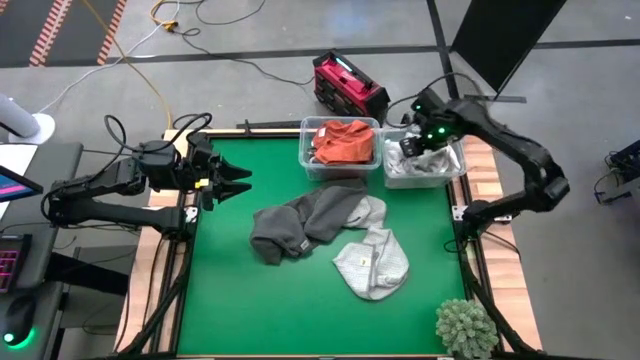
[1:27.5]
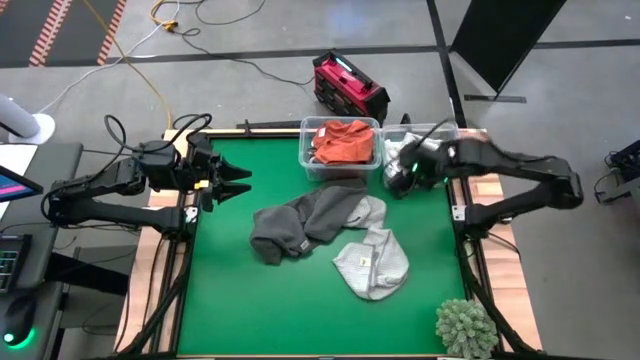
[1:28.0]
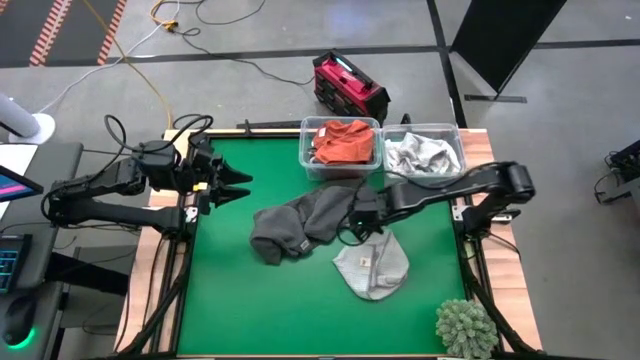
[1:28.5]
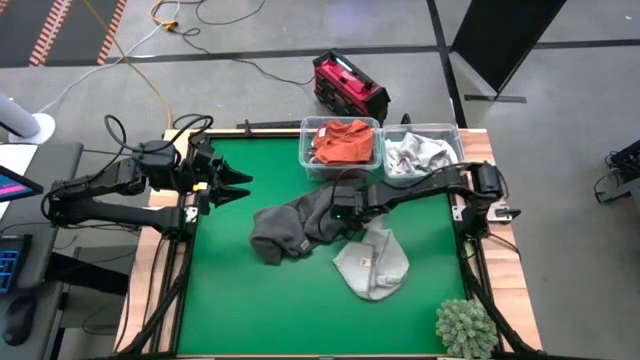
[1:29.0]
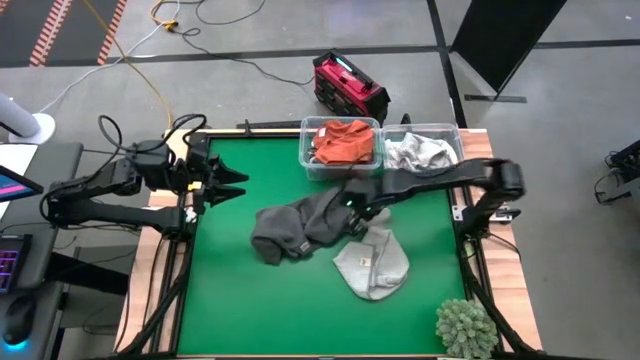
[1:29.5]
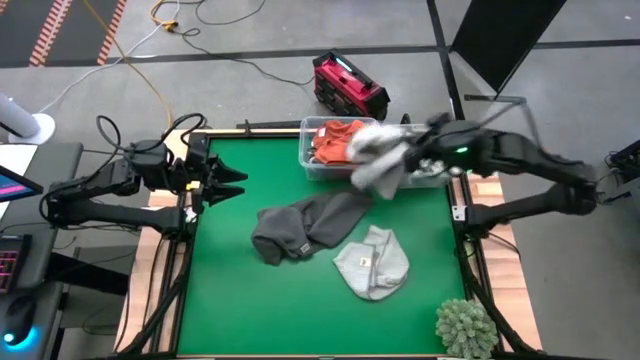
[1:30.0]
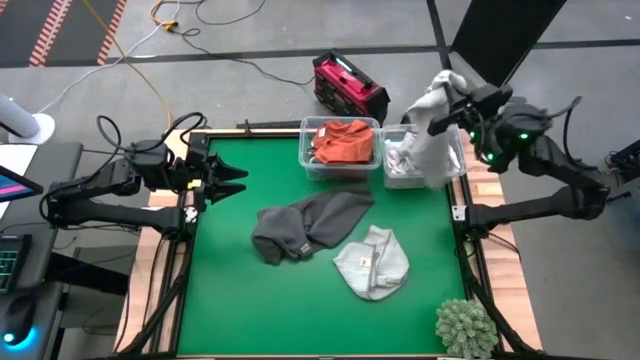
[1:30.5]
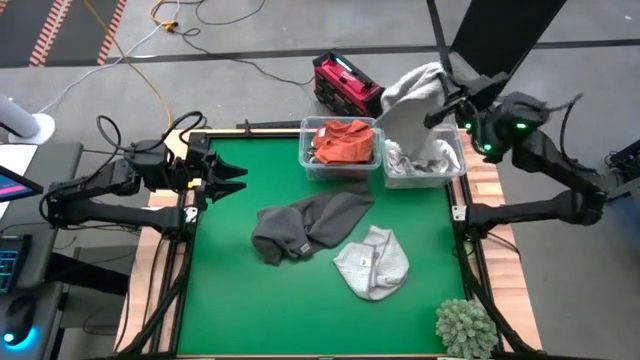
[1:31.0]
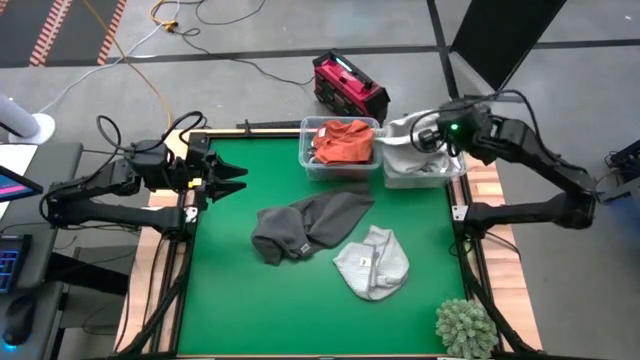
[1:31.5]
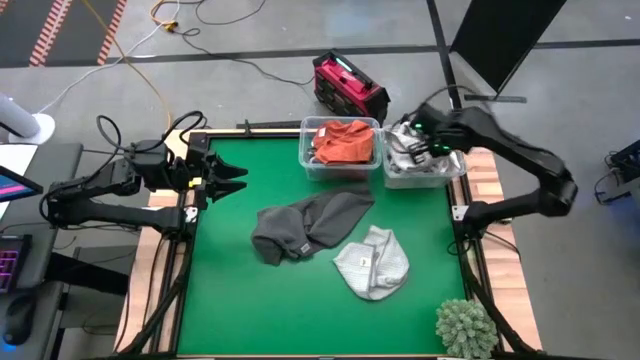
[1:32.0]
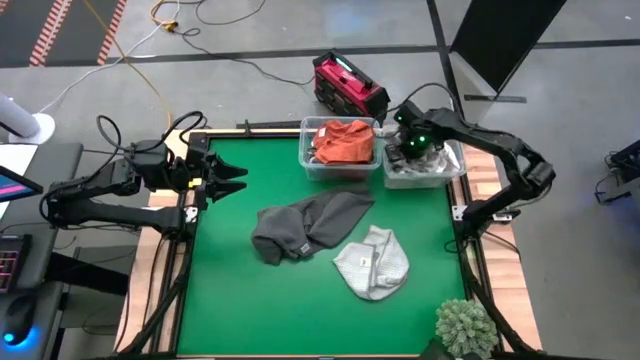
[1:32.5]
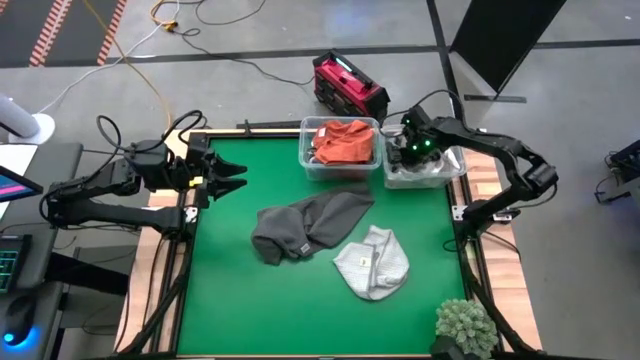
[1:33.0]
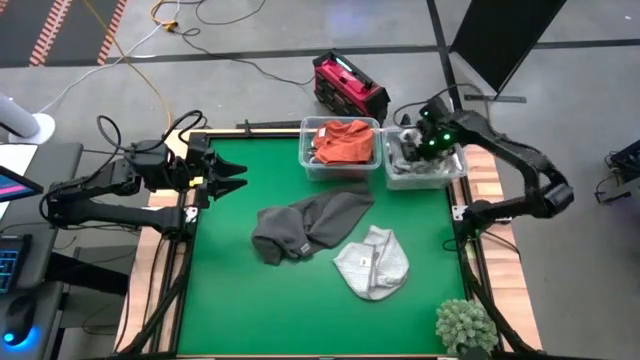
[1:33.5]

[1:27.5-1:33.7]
Task: Sort towels by color in basket
Put the light gray towel into the right transparent bin

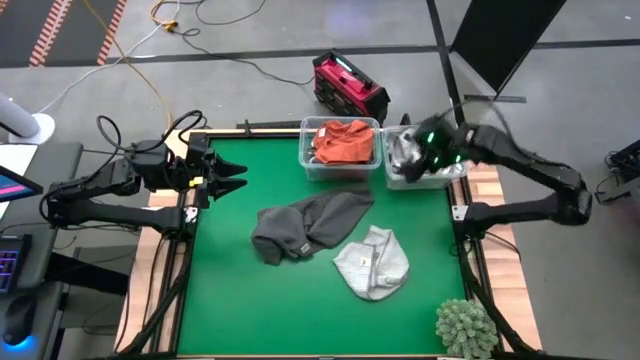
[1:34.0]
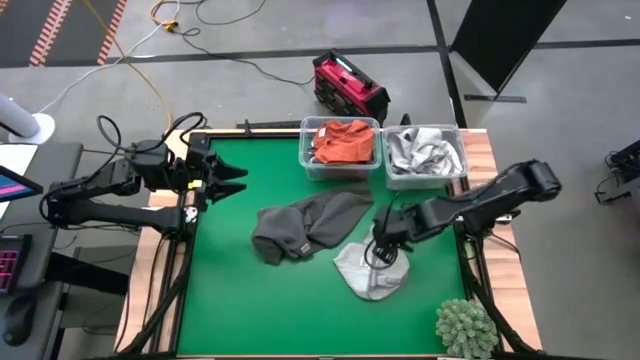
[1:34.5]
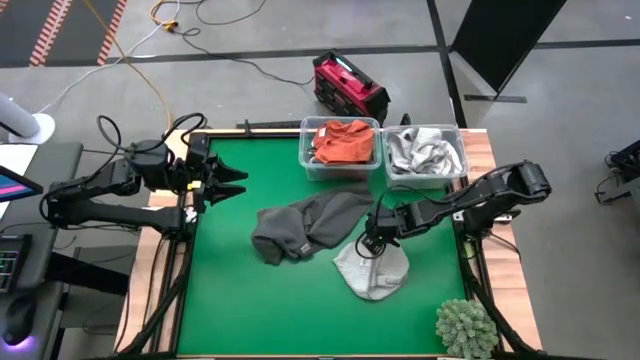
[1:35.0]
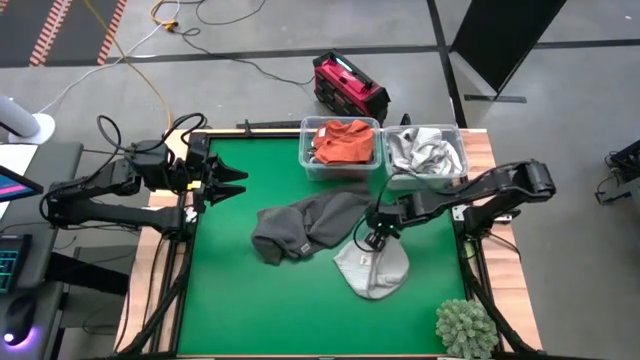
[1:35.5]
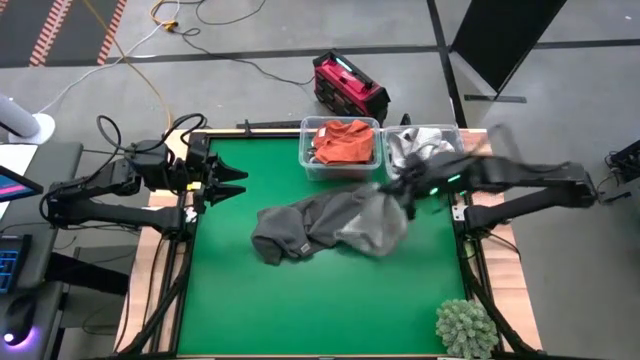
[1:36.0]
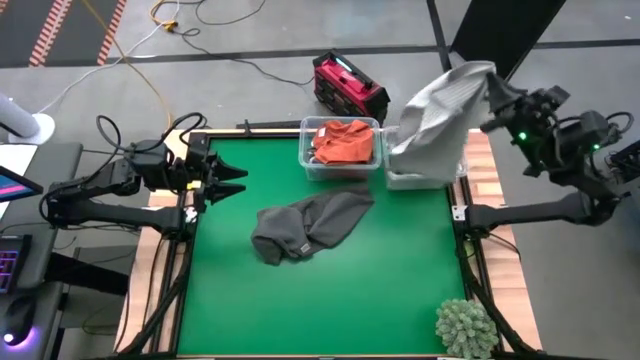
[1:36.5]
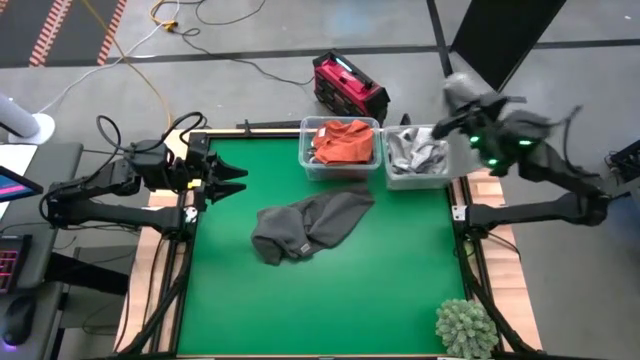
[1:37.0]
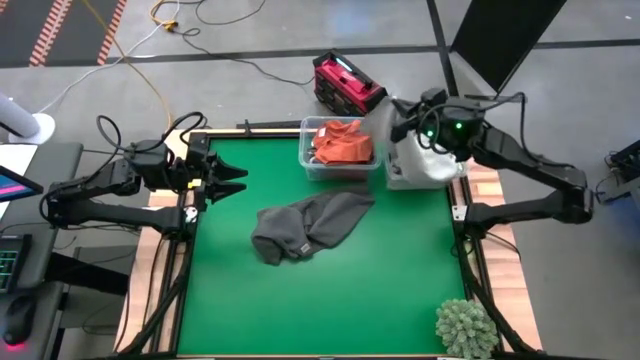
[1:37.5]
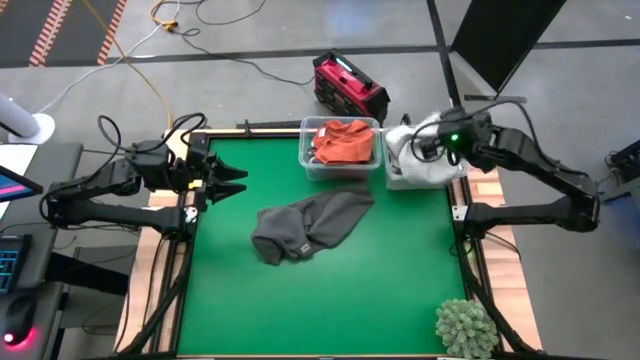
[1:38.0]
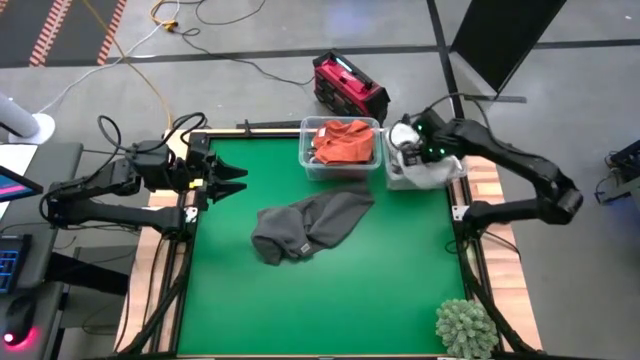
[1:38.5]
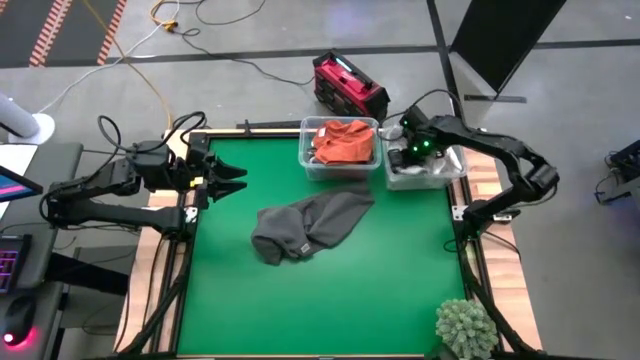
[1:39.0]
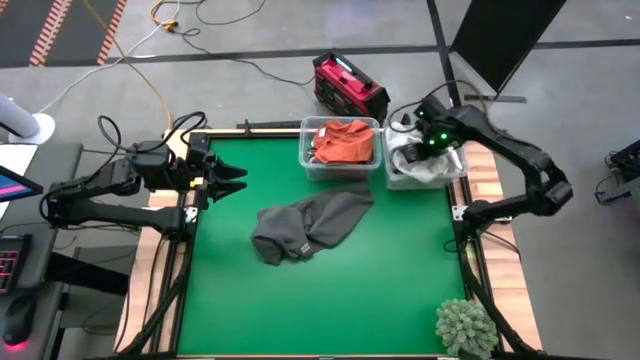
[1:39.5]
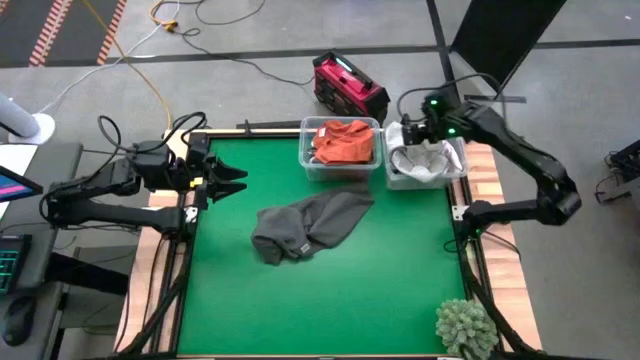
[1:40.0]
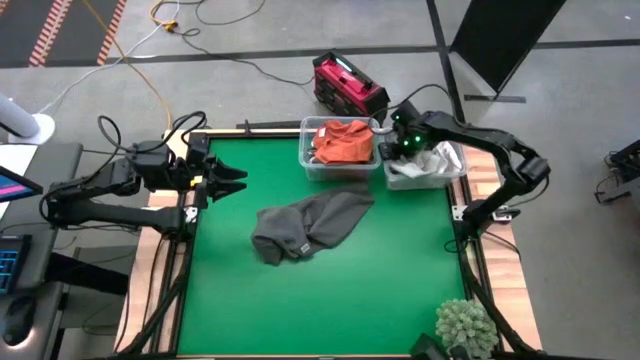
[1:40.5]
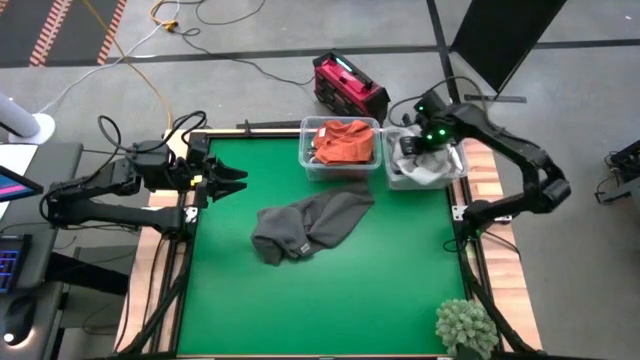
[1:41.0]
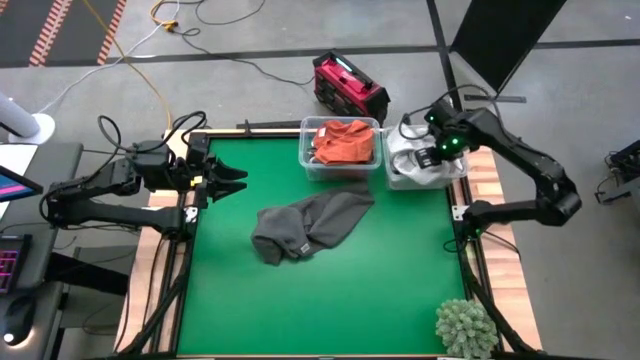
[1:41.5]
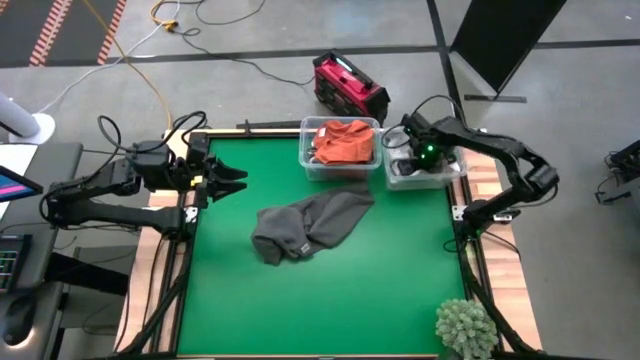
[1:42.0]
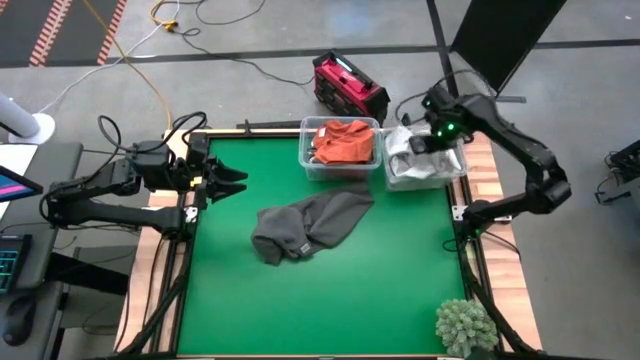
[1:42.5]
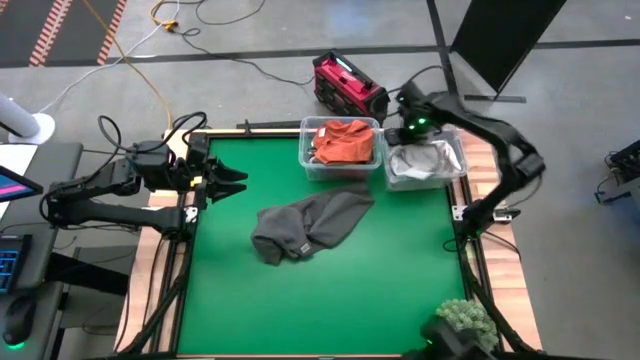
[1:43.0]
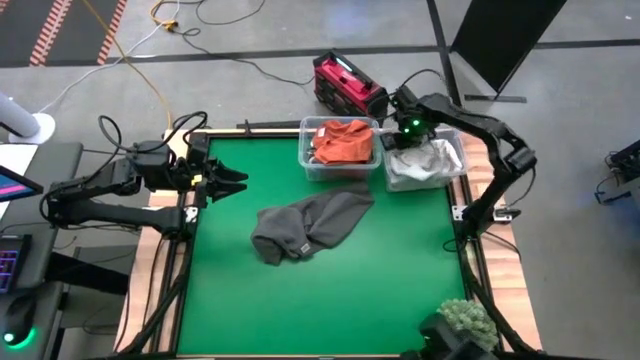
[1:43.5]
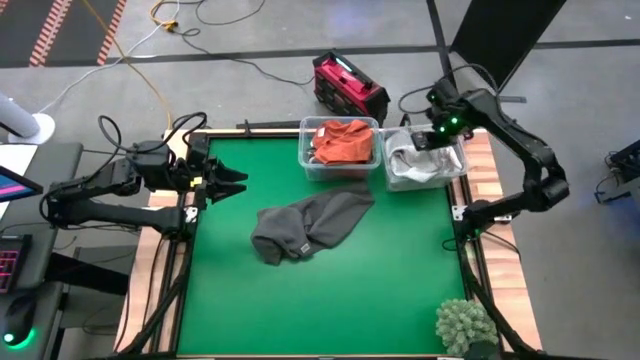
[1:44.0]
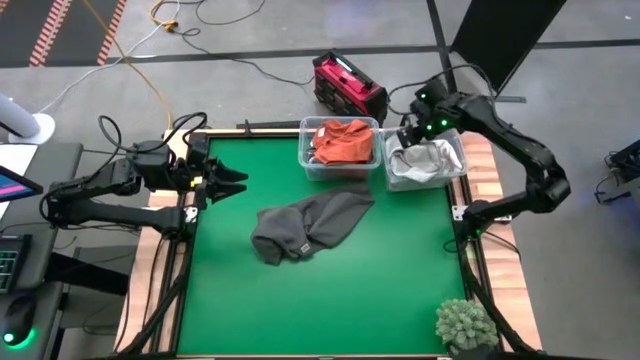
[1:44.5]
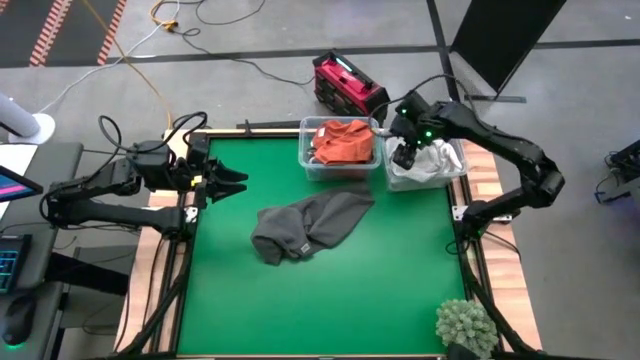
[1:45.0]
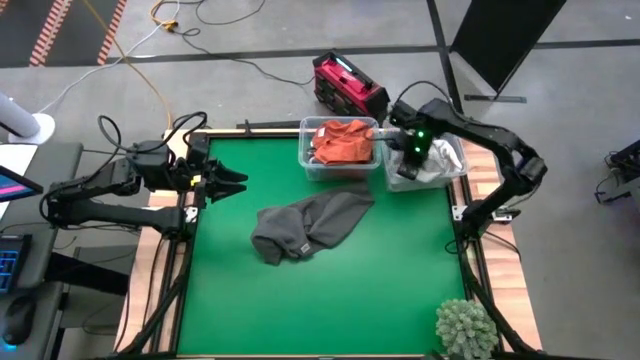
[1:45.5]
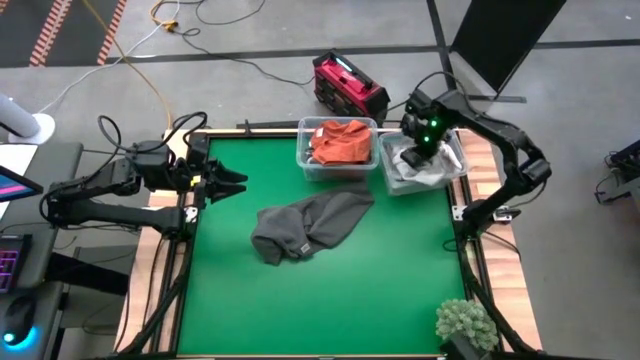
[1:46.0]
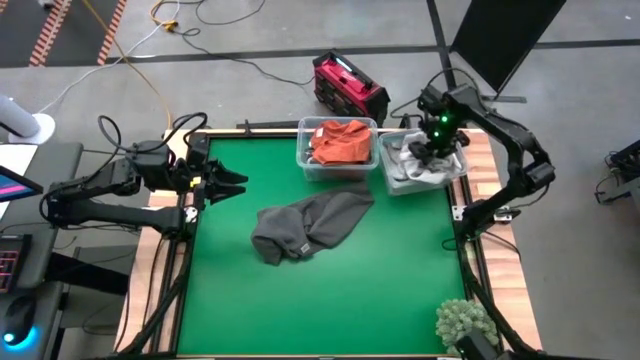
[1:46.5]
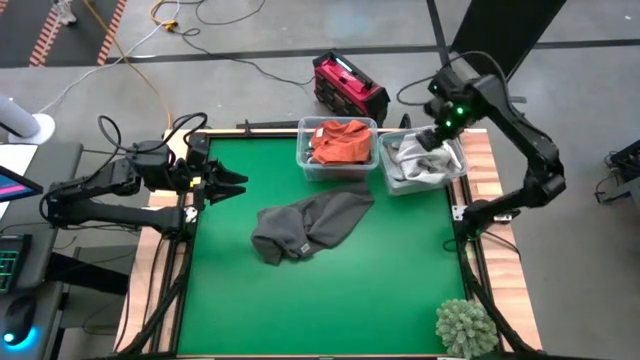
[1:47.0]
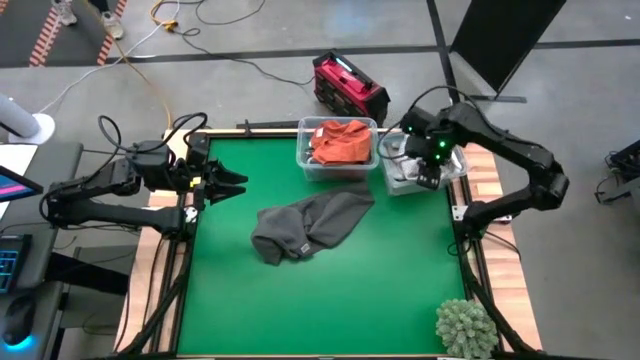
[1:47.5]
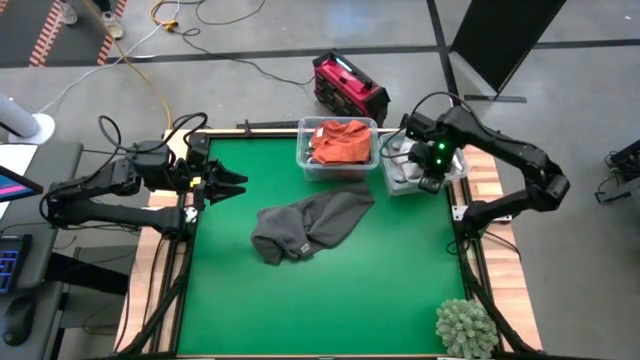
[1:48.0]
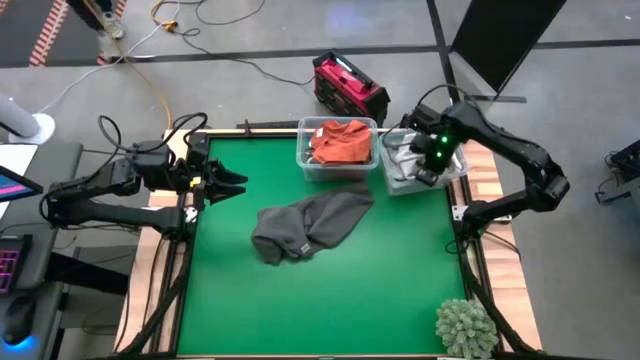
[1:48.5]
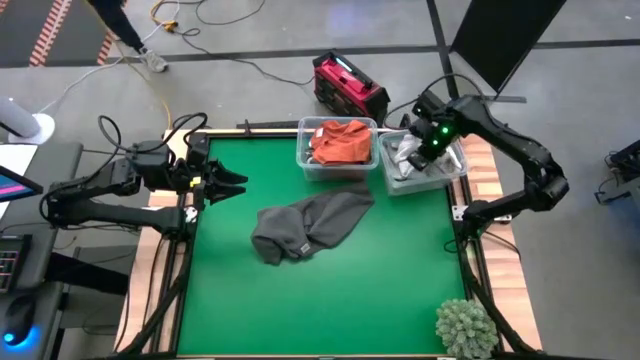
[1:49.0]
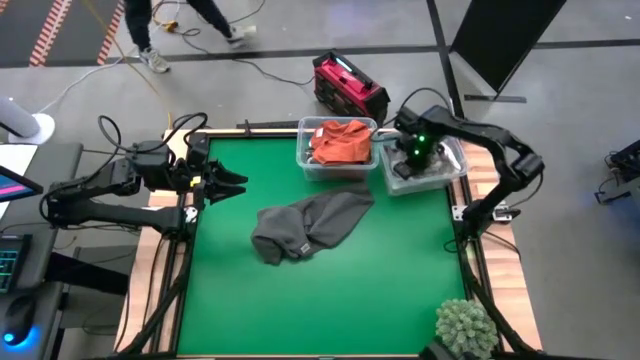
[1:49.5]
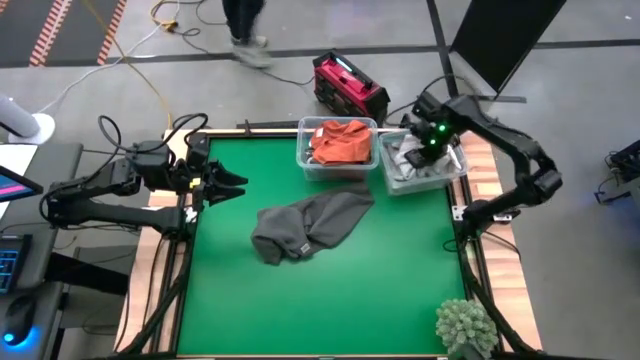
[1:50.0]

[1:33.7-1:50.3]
Put the light gray towel into the right transparent bin
